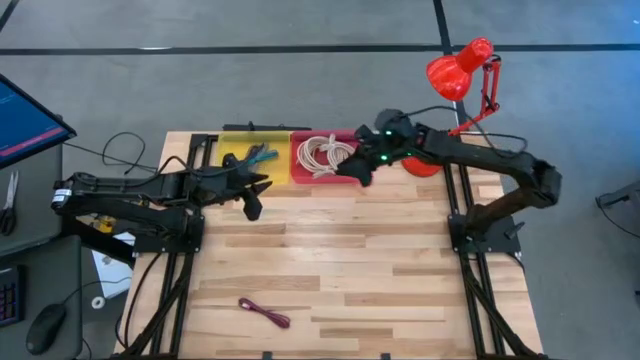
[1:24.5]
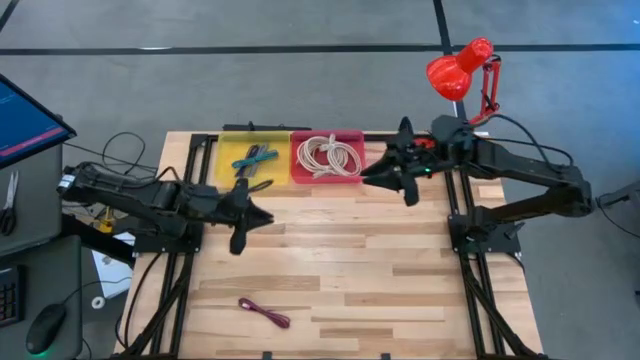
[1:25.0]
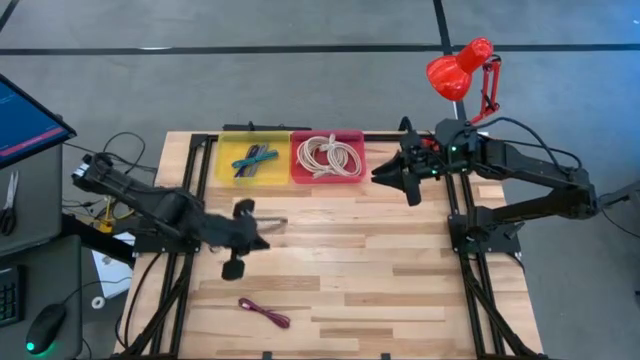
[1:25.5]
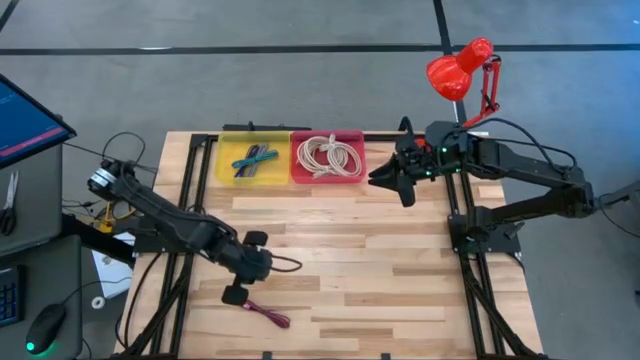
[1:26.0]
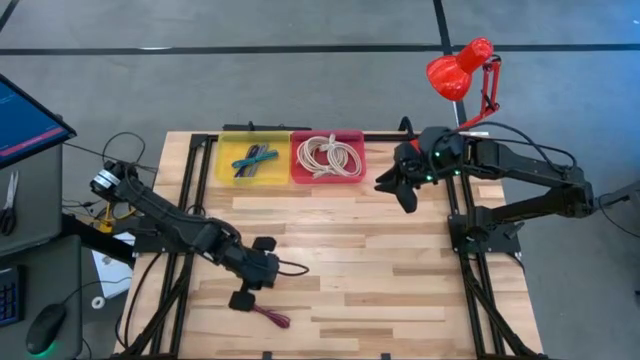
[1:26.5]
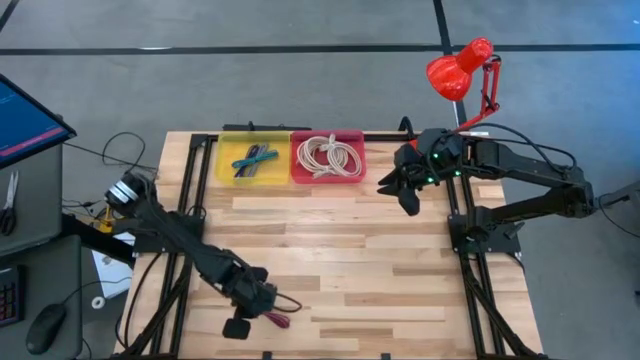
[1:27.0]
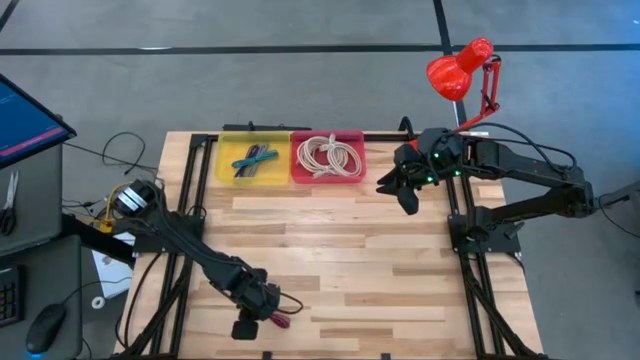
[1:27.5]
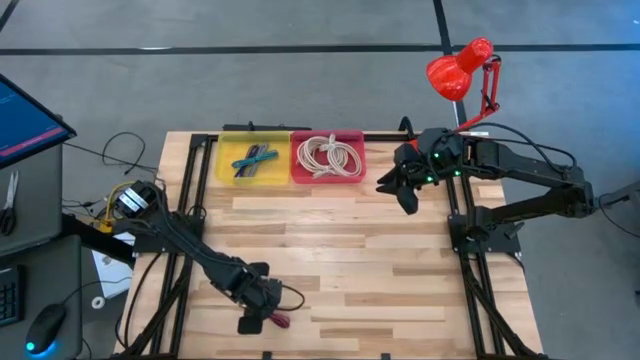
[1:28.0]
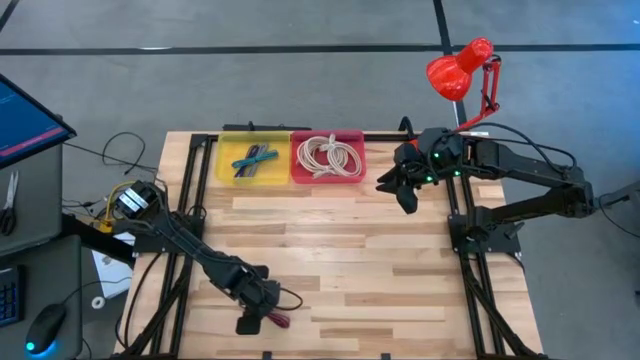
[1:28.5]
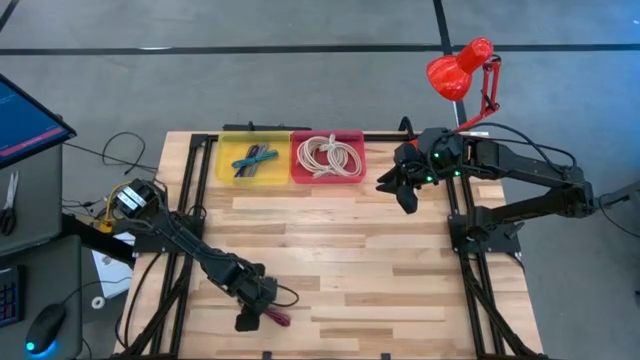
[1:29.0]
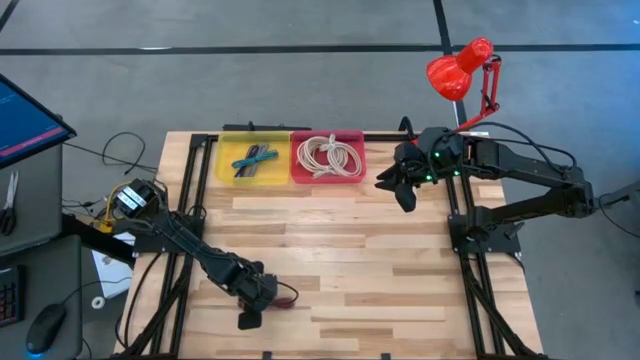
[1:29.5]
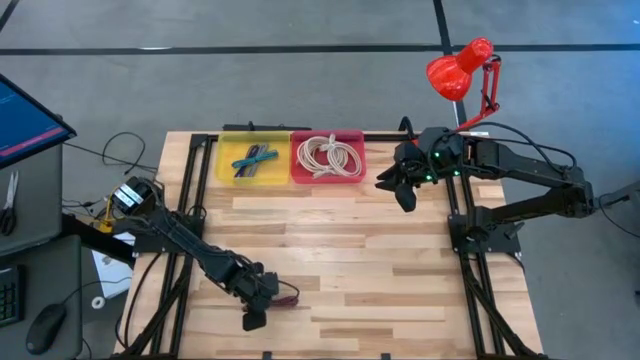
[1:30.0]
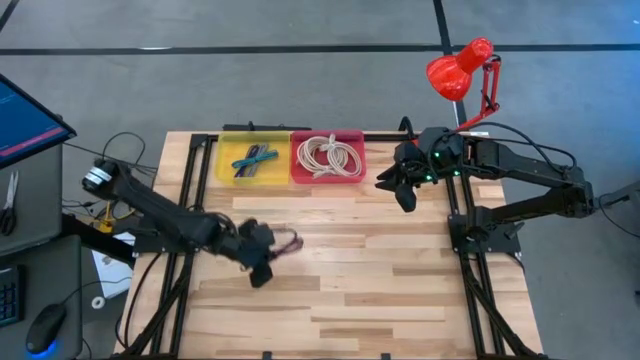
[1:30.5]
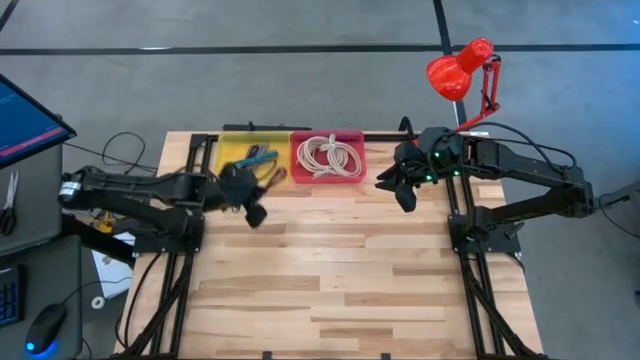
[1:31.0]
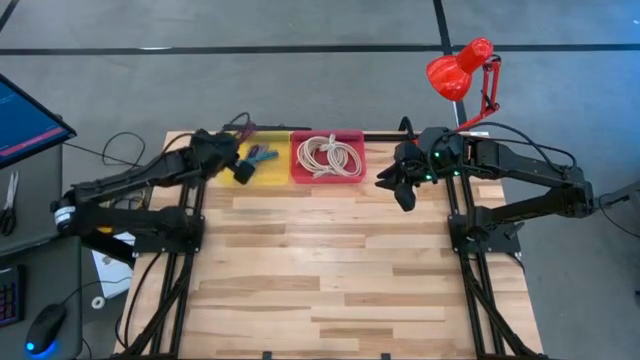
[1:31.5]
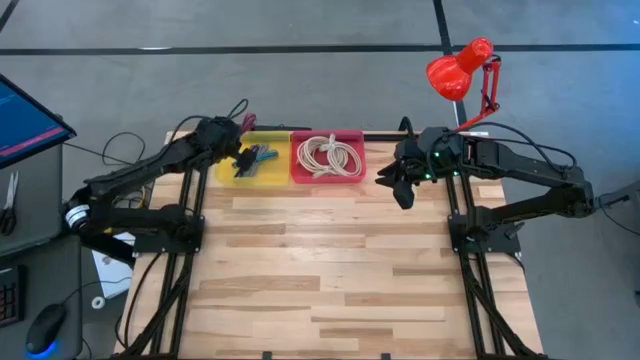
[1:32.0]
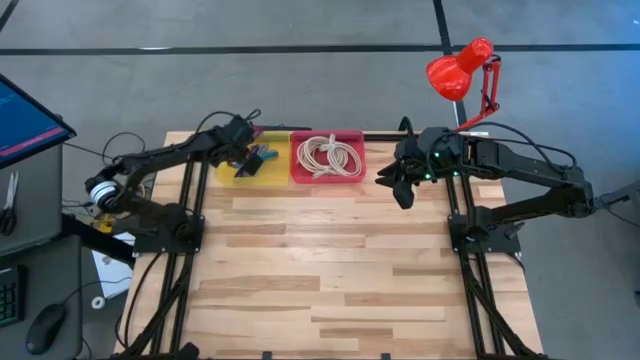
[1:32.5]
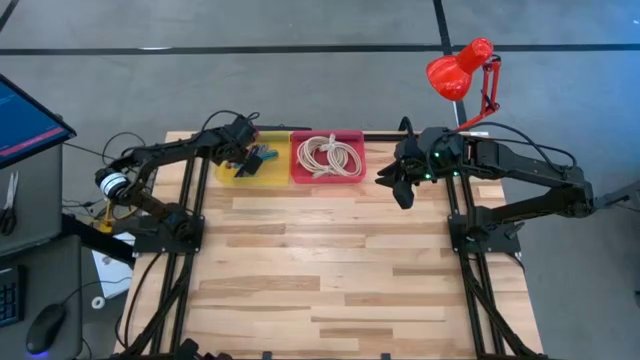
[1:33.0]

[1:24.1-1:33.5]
Task: Pick & Place USB Port
Put the pink charger cable into the yellow bin

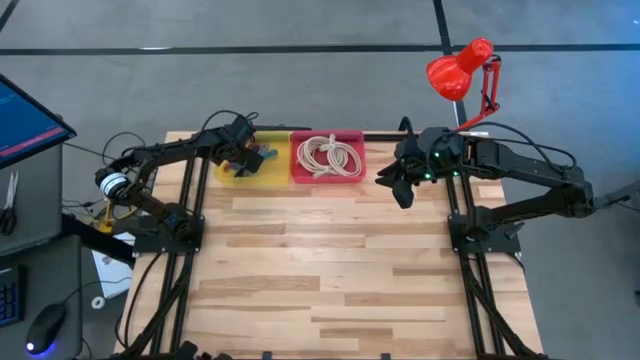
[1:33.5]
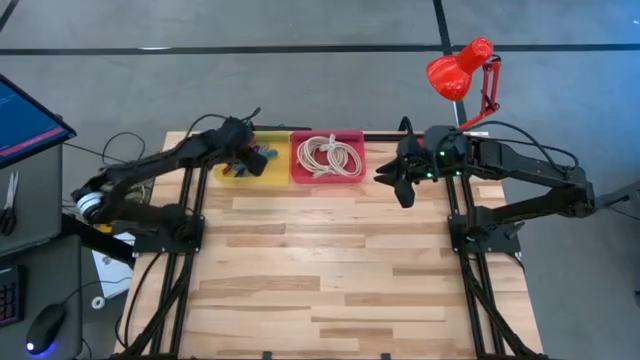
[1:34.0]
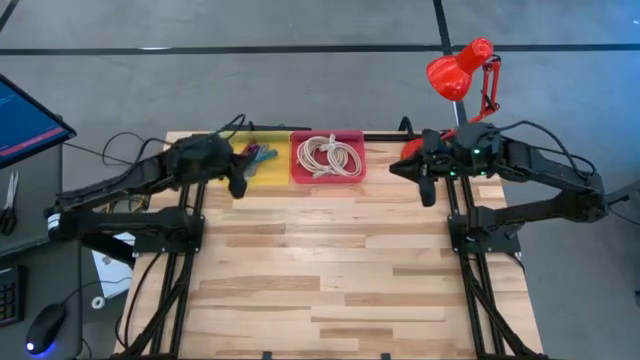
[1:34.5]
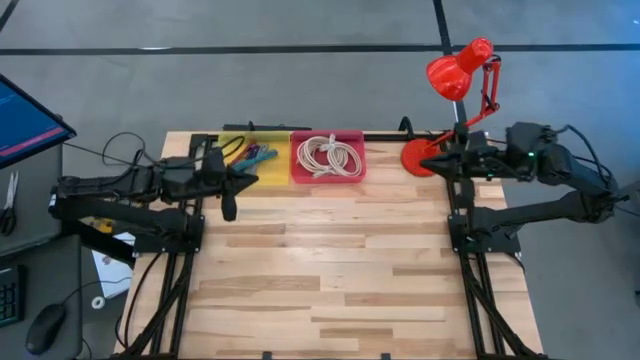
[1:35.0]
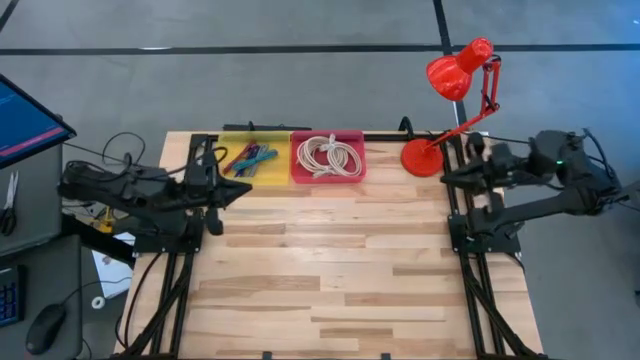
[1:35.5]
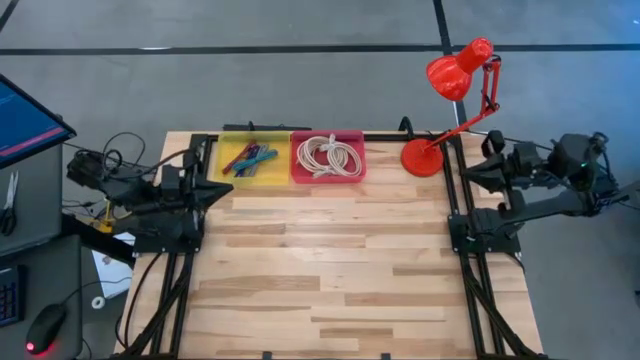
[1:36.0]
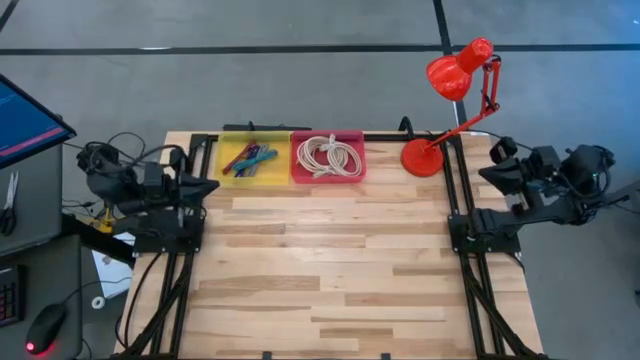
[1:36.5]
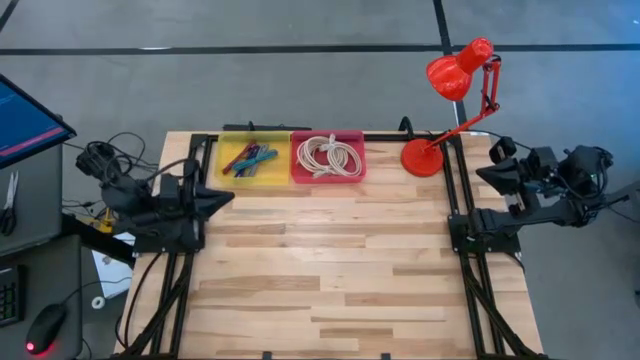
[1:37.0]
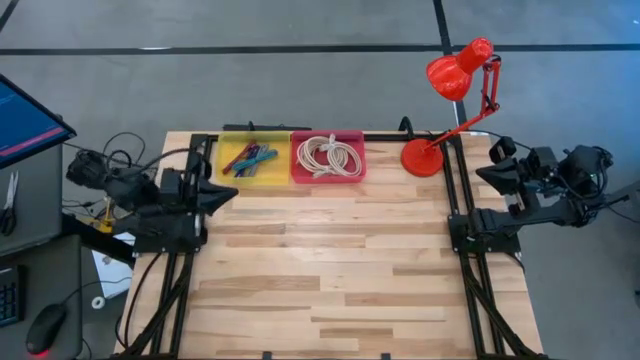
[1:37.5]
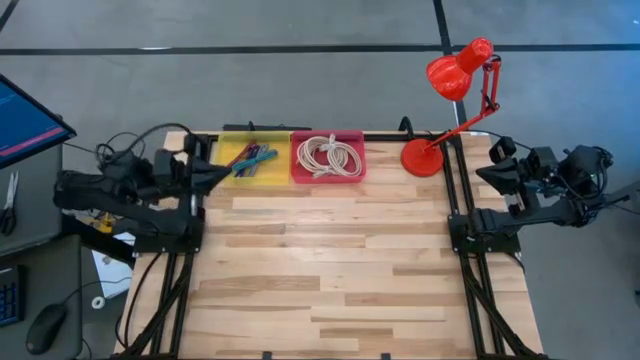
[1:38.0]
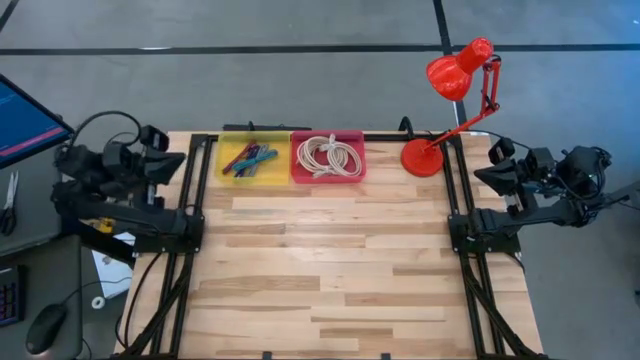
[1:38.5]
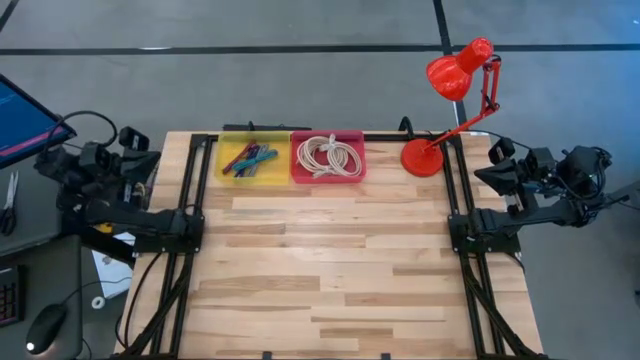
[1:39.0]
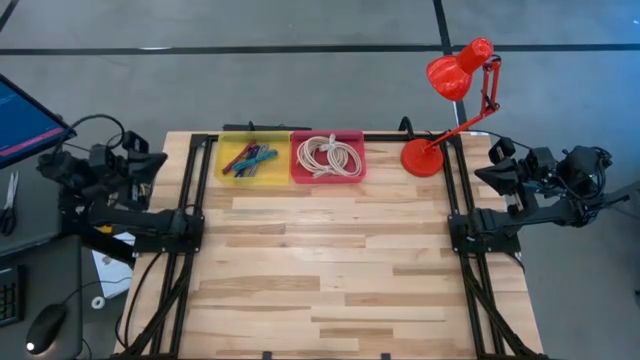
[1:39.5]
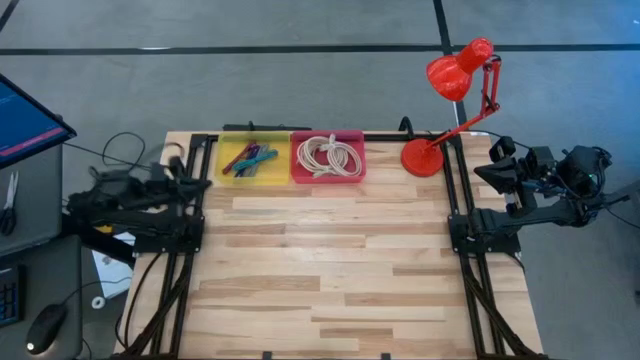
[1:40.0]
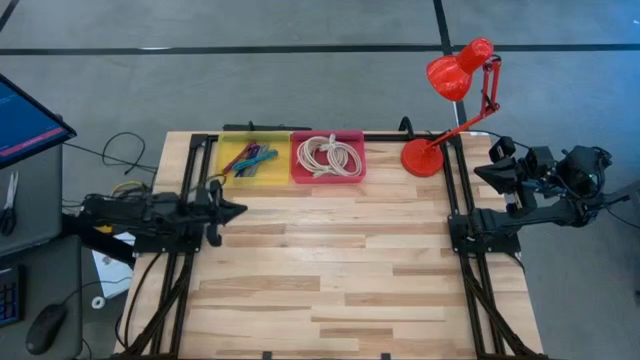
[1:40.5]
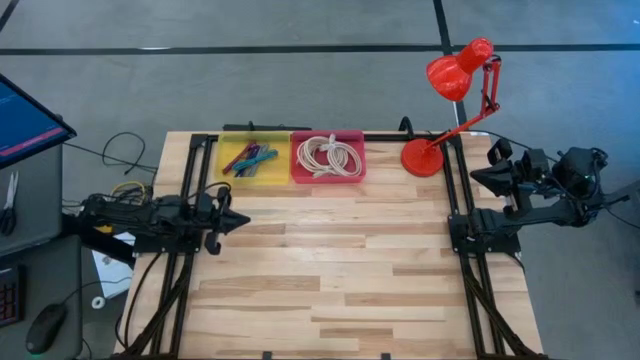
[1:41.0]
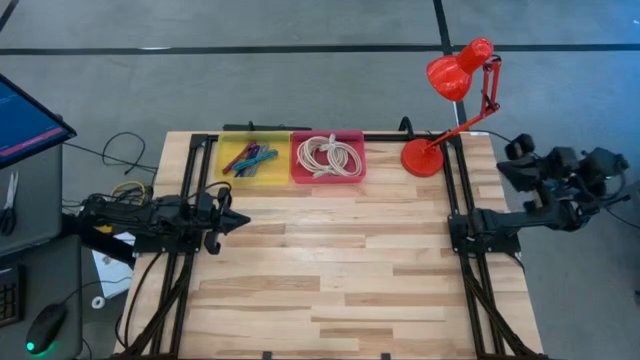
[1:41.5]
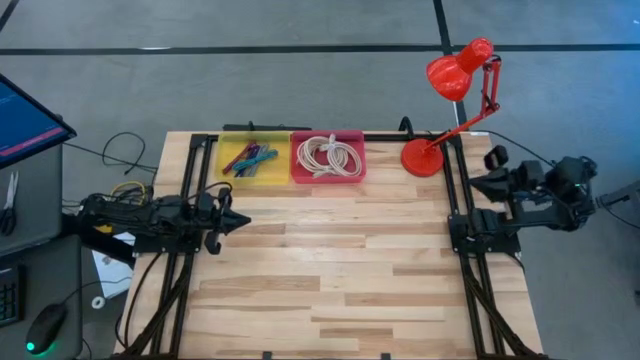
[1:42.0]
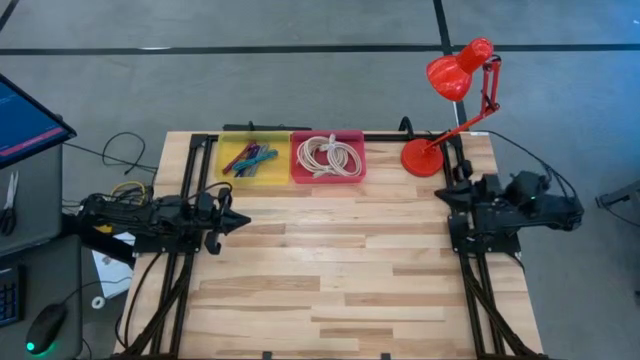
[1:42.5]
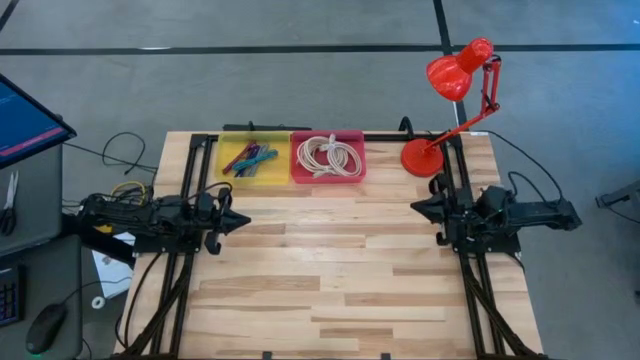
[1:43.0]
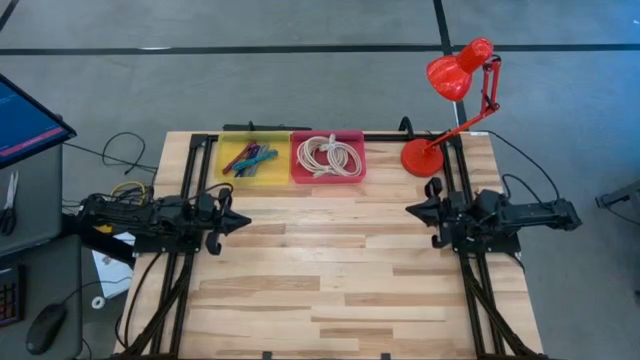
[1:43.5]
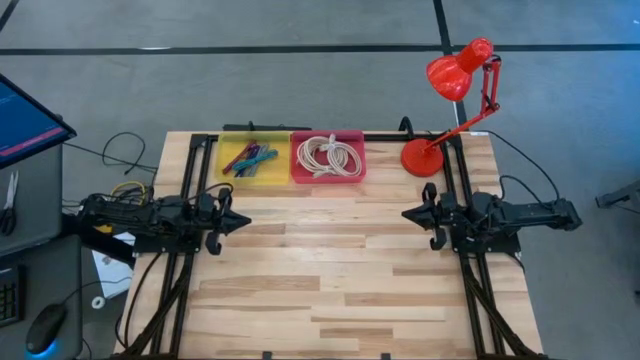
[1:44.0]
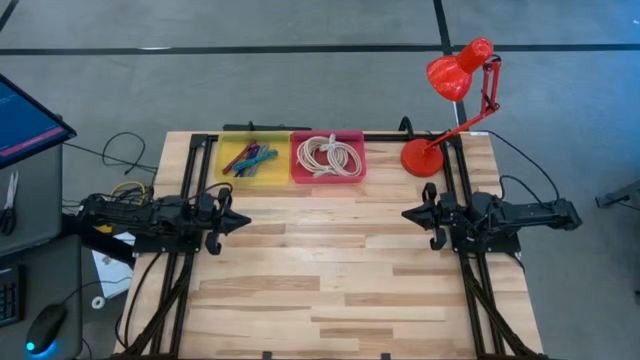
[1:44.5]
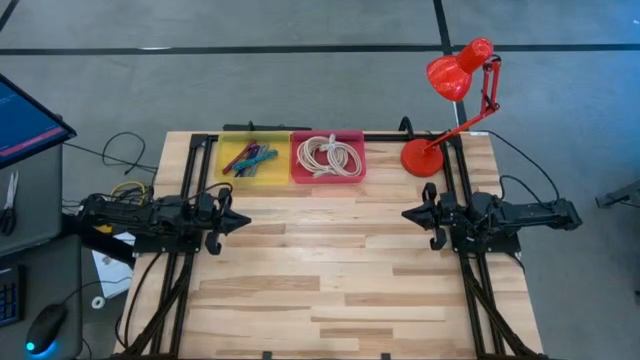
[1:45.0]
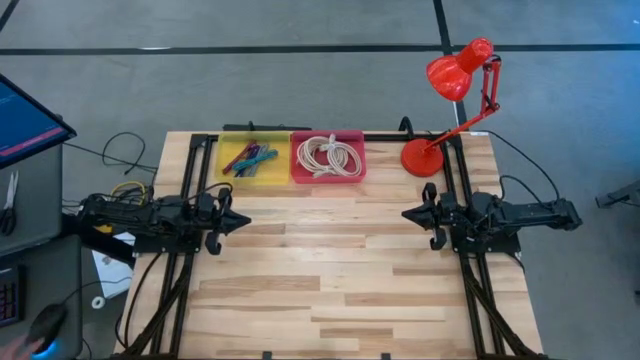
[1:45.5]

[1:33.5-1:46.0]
Return to home position
